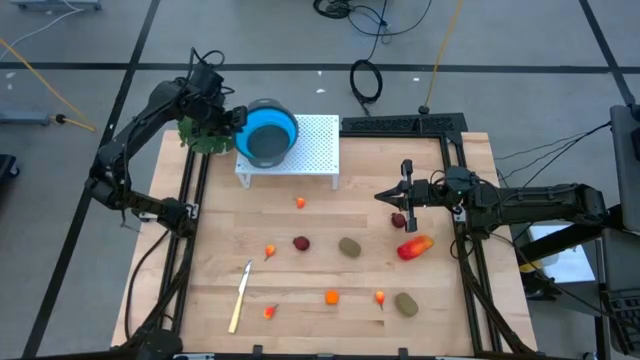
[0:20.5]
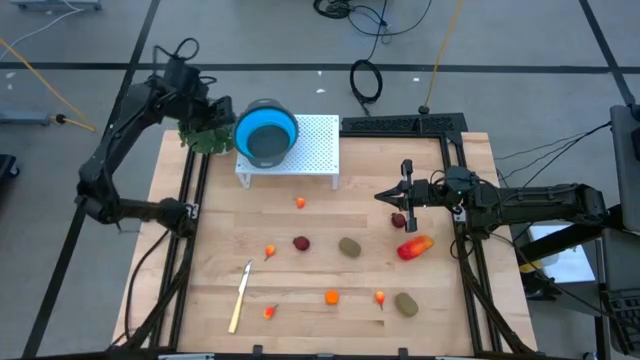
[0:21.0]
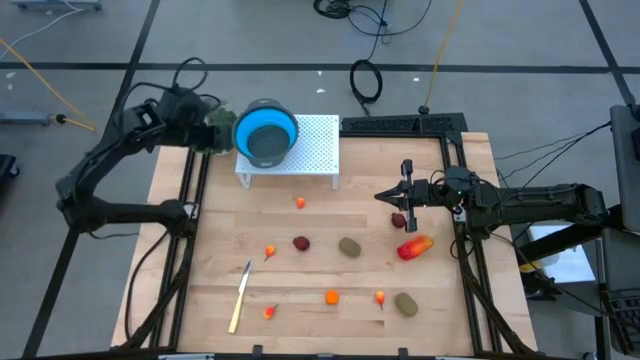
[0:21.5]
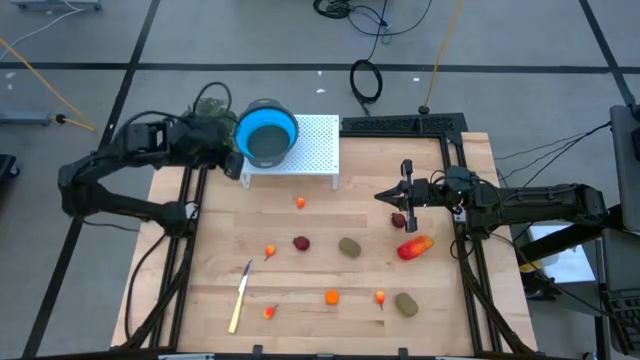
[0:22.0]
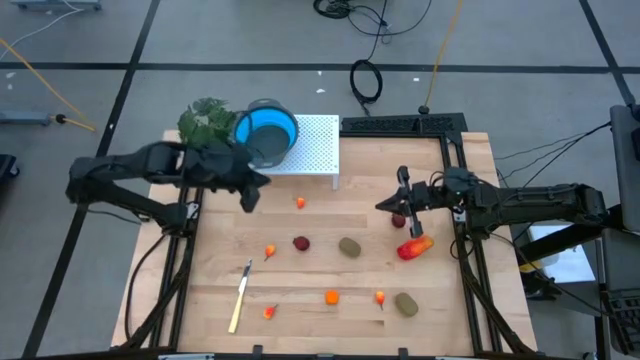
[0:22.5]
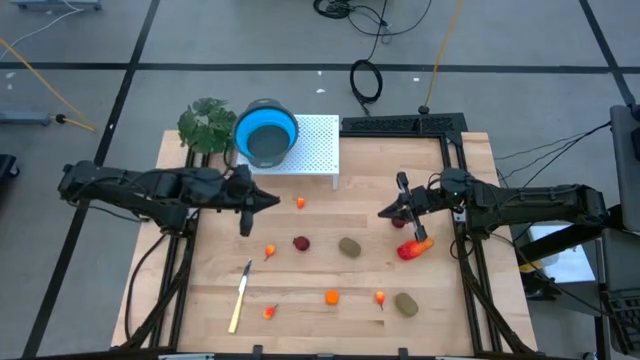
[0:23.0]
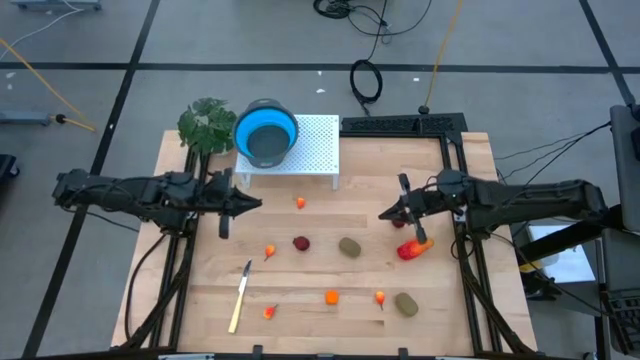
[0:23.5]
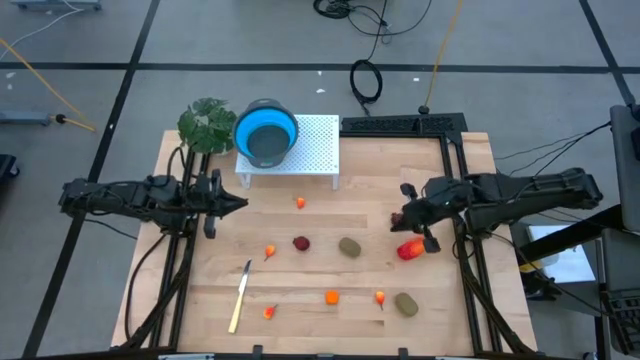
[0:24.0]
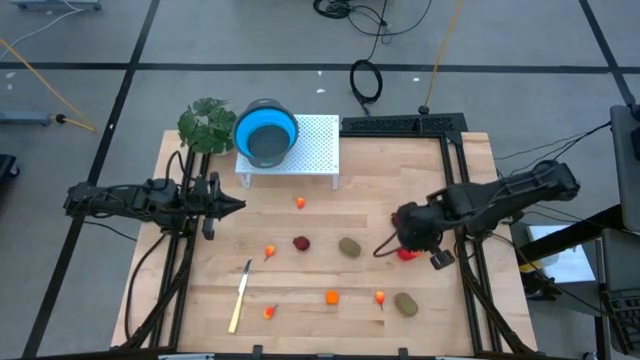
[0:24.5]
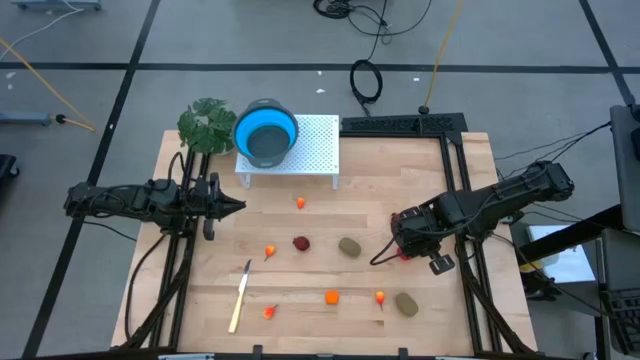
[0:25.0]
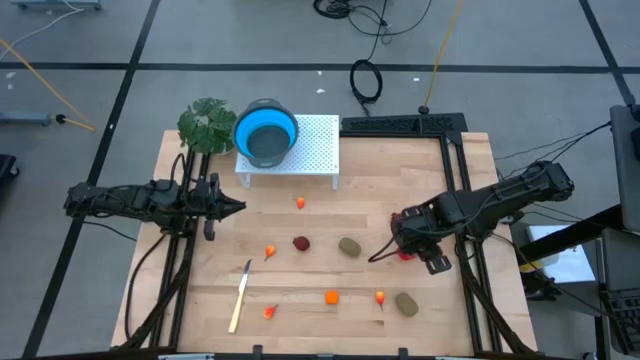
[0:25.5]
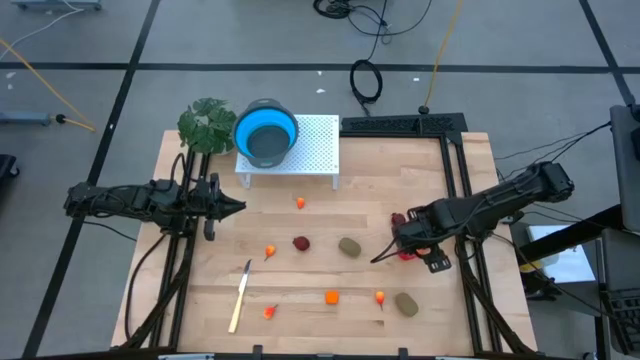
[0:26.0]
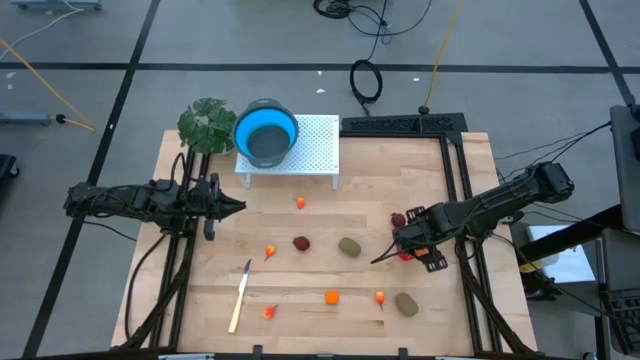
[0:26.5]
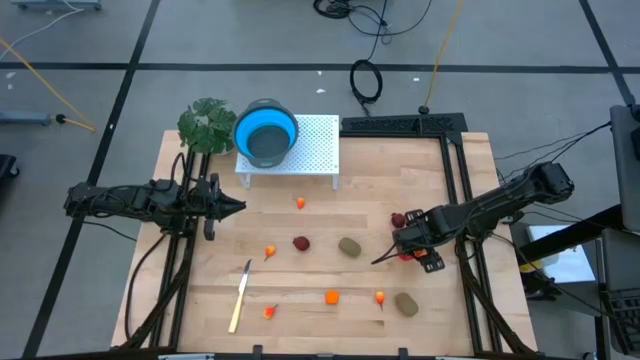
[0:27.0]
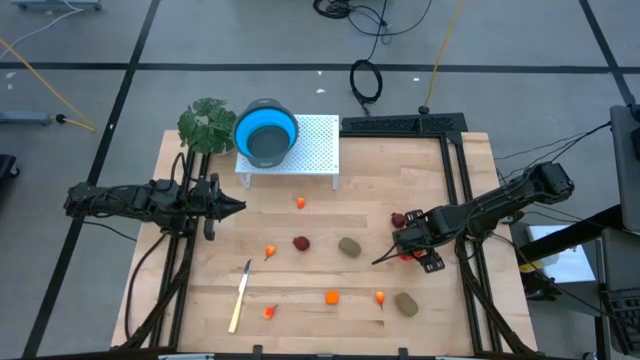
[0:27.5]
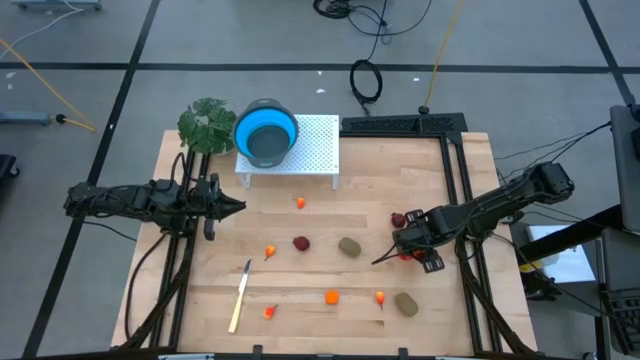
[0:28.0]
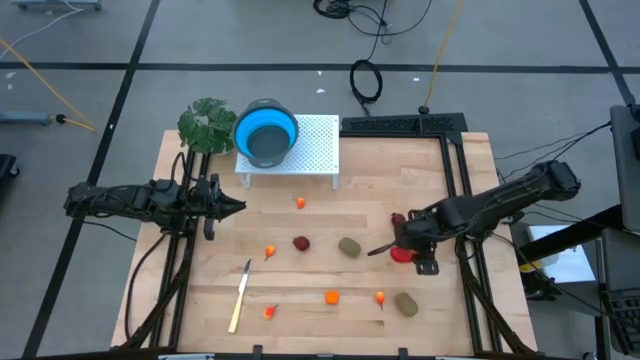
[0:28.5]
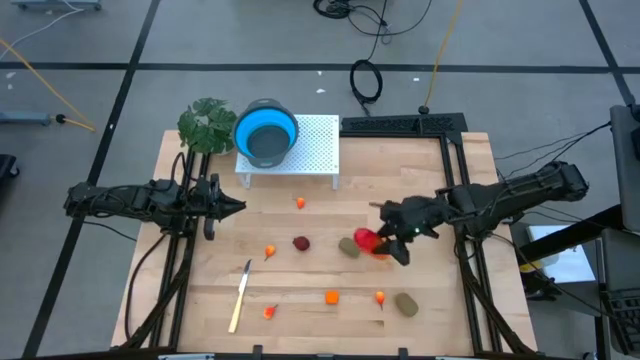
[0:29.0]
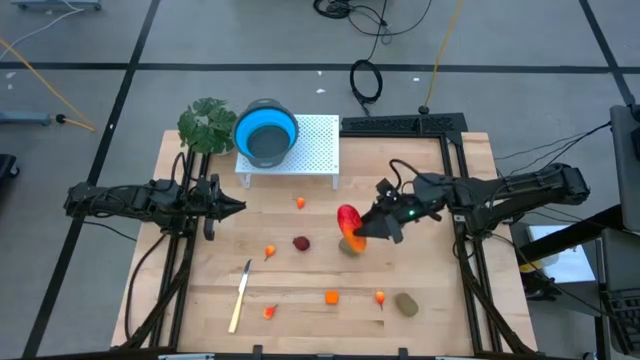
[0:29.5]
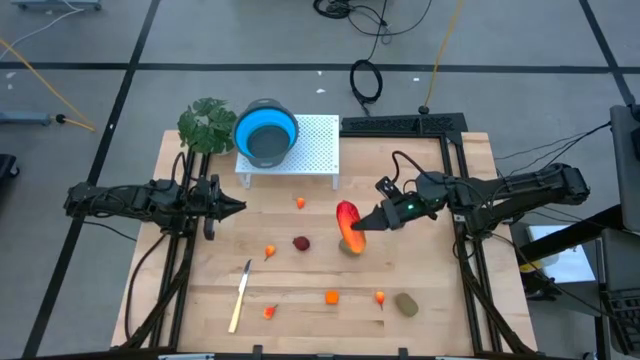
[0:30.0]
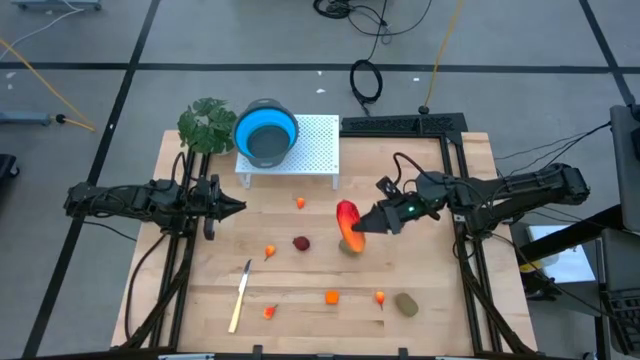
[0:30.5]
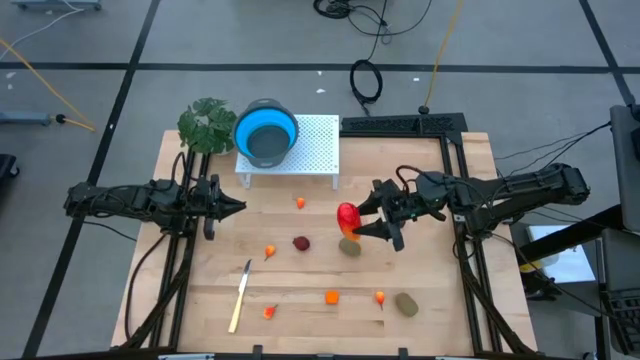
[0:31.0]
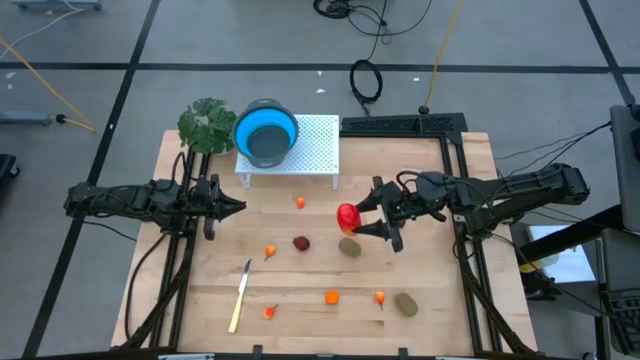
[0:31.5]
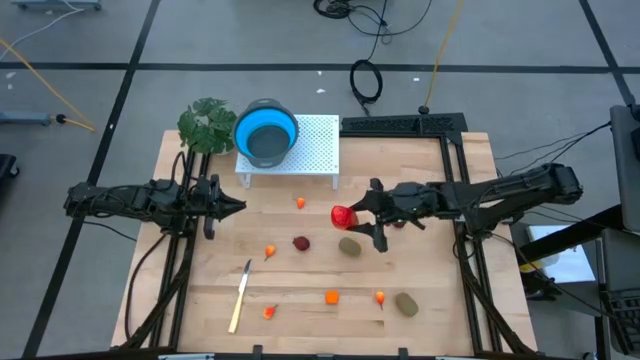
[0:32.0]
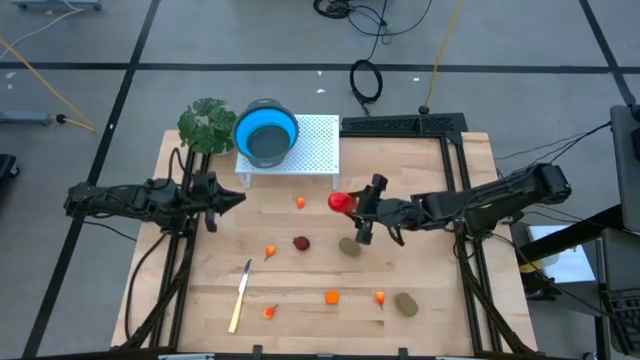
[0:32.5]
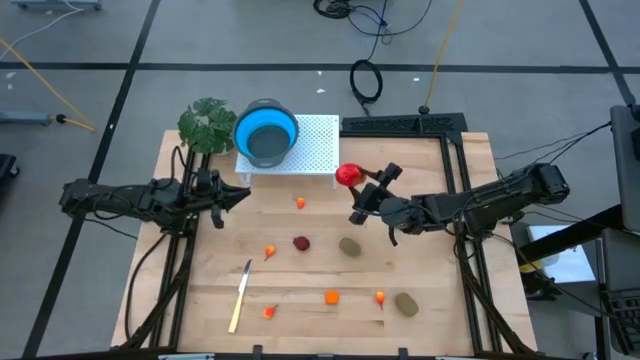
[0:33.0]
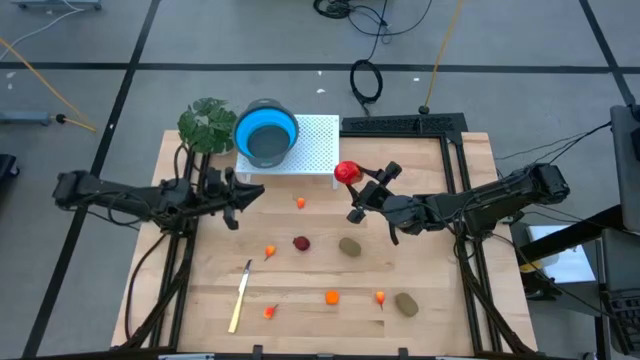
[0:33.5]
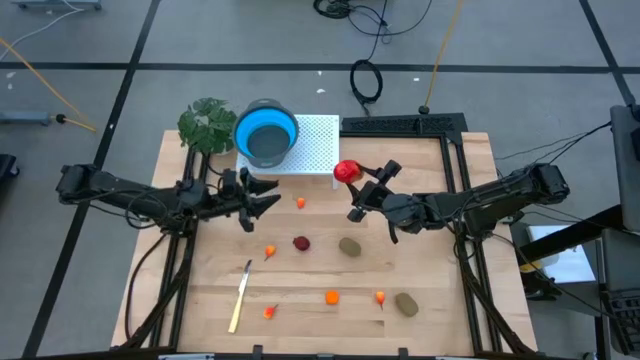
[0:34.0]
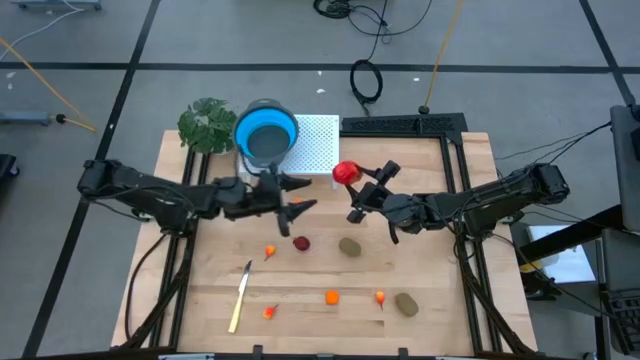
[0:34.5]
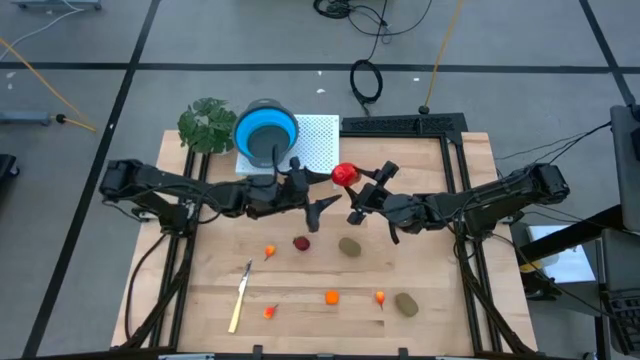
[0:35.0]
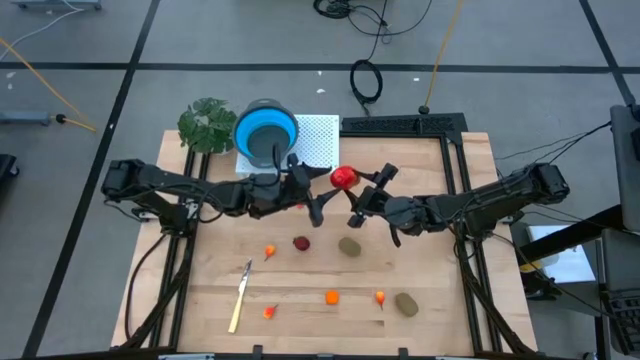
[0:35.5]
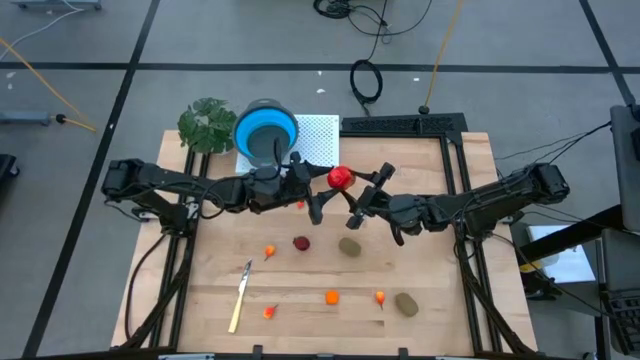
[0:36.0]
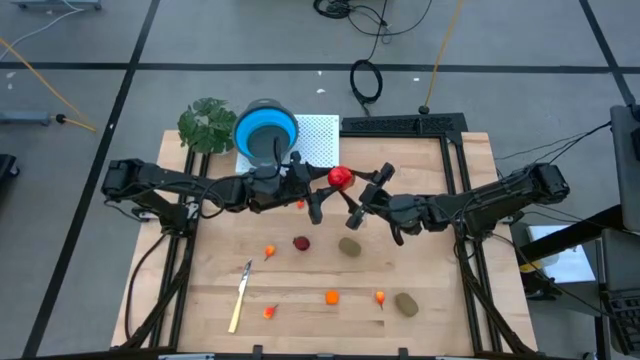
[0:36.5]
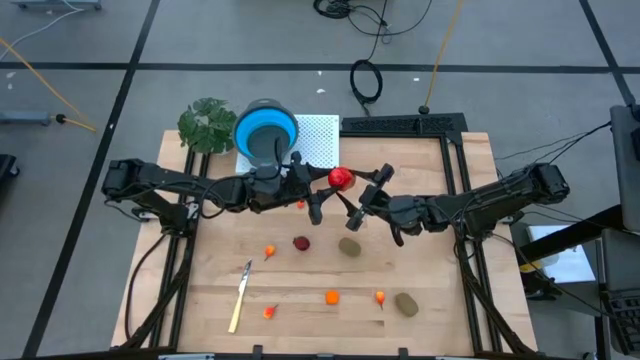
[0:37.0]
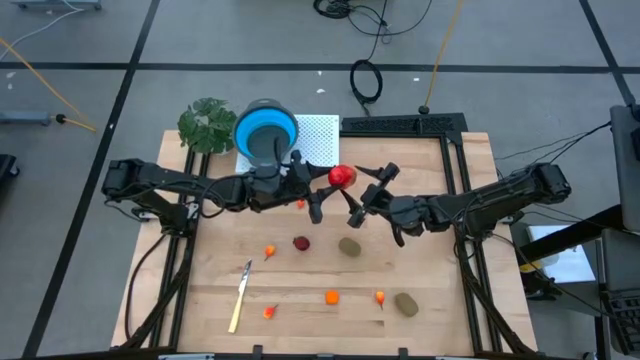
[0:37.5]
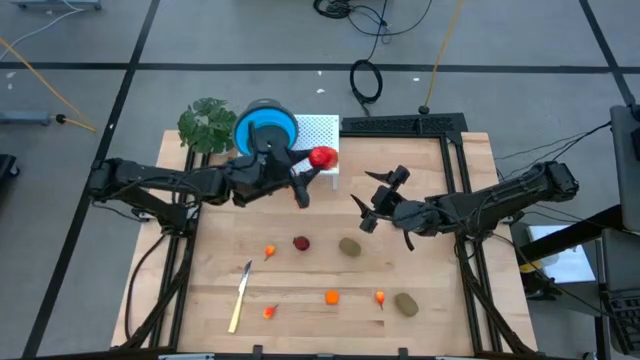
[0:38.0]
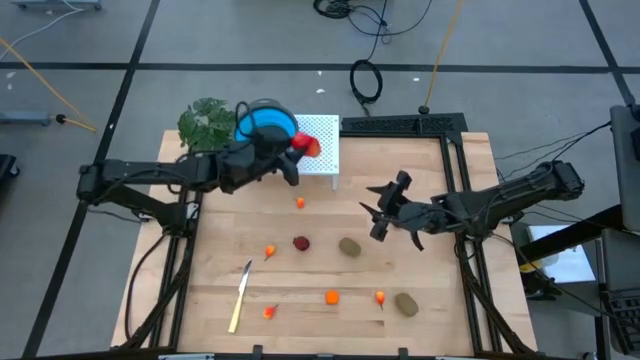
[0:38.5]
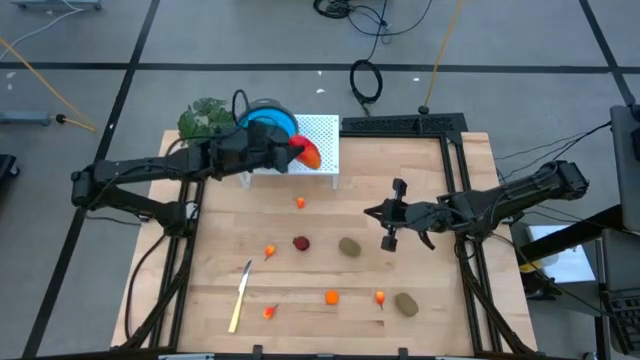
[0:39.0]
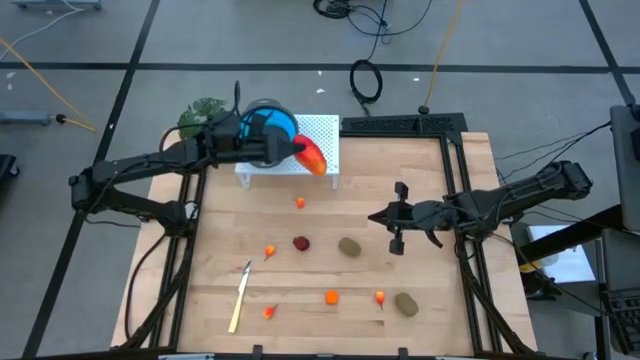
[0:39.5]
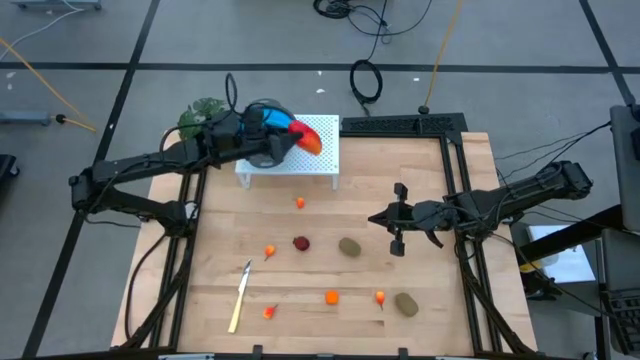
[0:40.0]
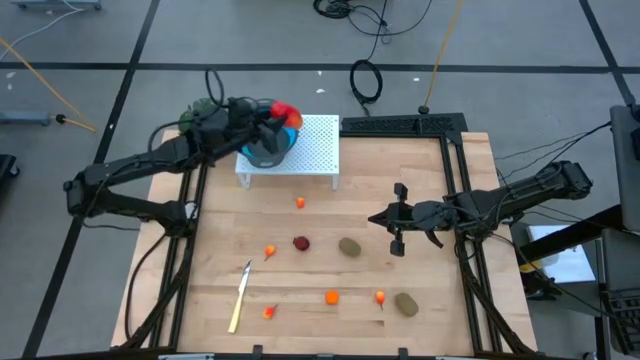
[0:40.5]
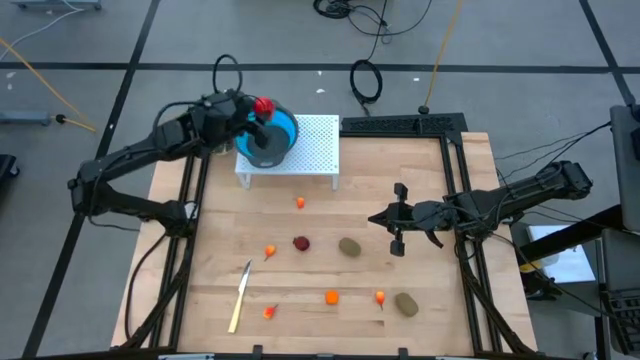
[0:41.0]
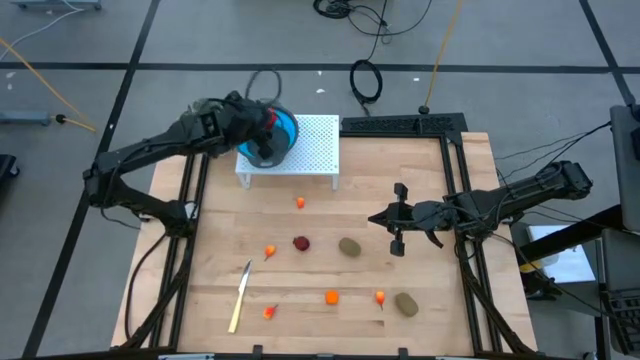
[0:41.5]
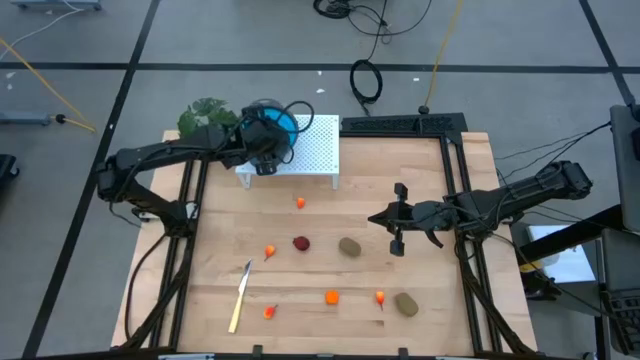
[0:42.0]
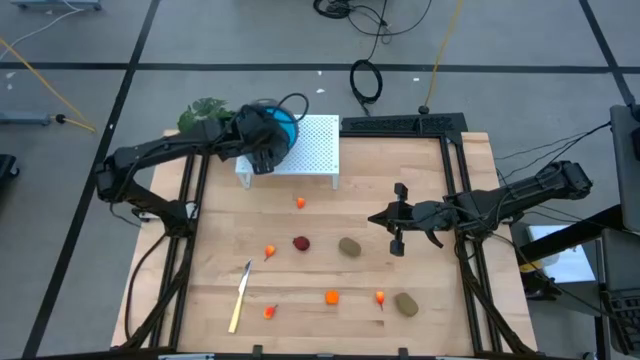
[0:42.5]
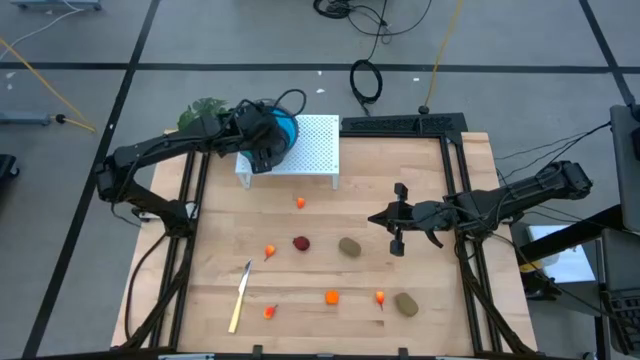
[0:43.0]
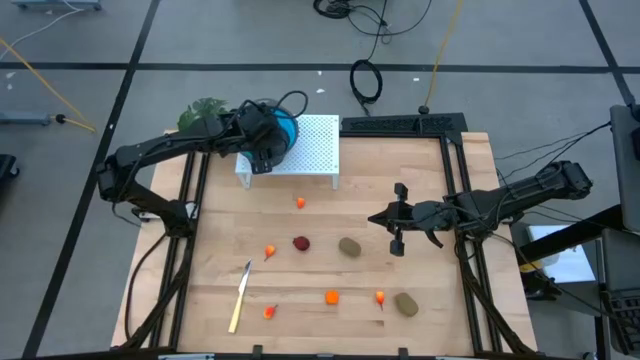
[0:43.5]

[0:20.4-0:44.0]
Task: Pick & Place Fruit
Put the red mango into the blue strainer bowl on the shelf
